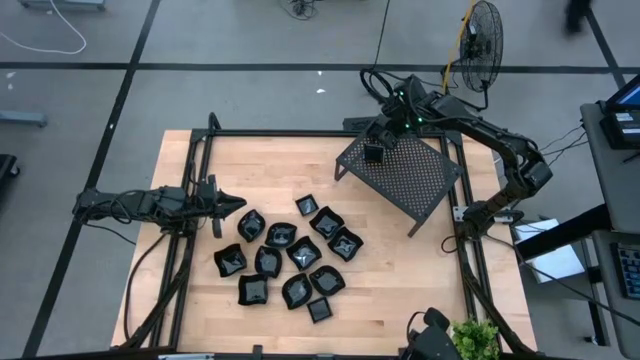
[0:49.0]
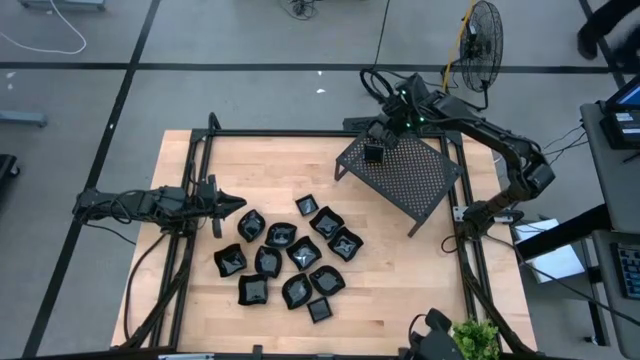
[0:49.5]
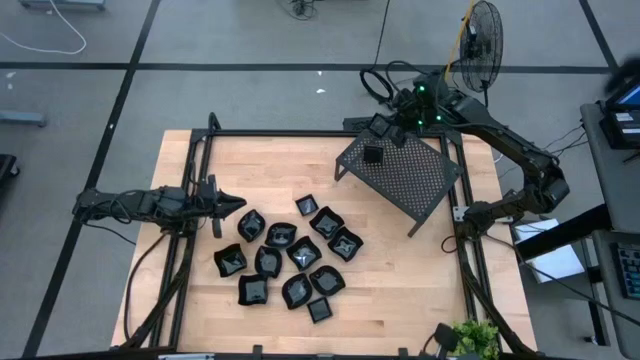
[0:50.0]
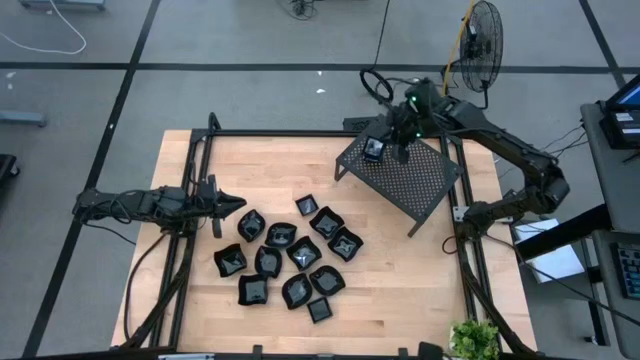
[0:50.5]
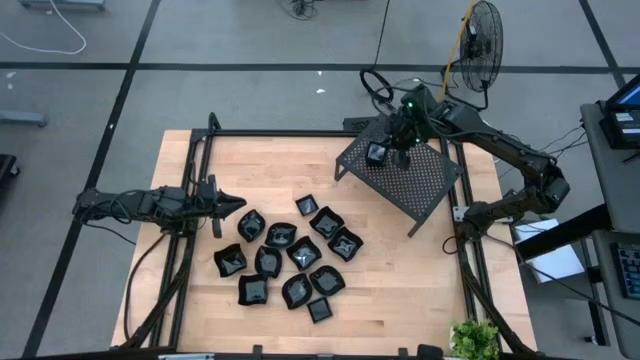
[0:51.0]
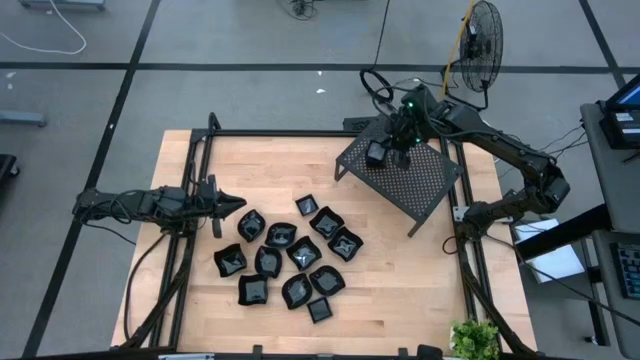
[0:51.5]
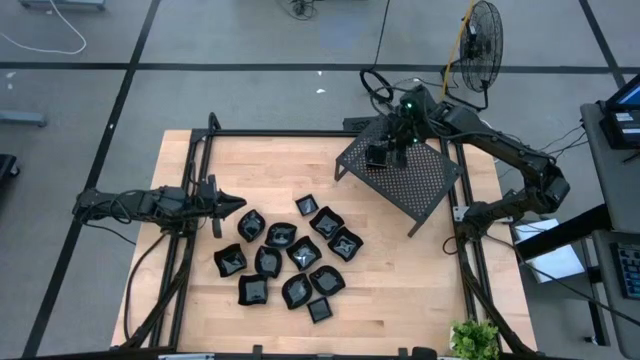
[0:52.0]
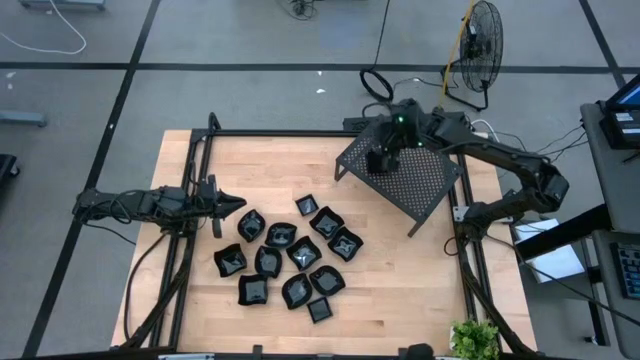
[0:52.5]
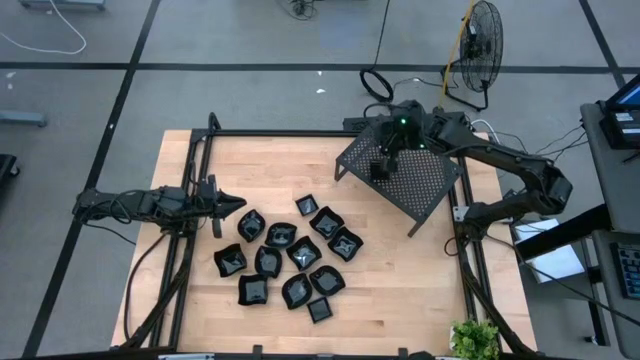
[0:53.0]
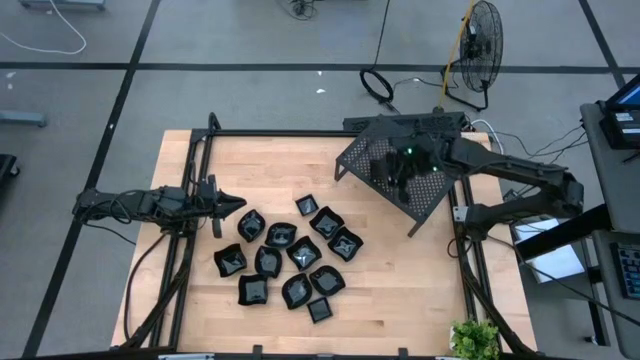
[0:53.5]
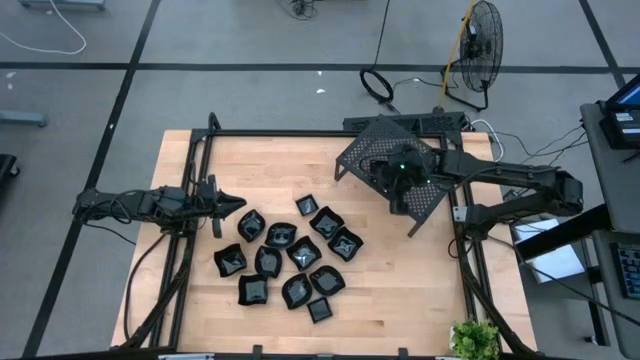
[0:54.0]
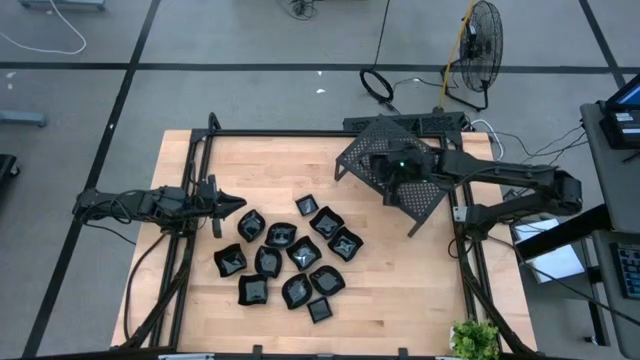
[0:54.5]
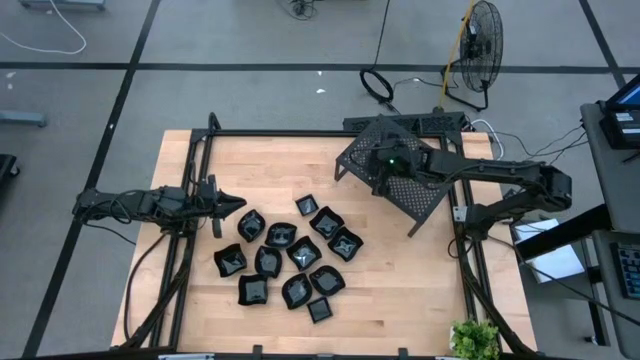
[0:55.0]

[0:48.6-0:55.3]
Task: Pick & Place Mini shaped plates
Stack the black square plate on the square black plate on the shelf

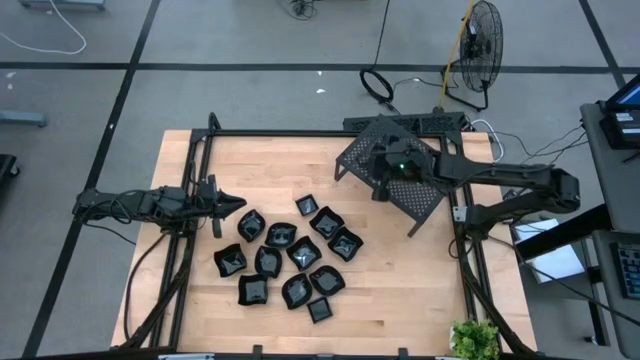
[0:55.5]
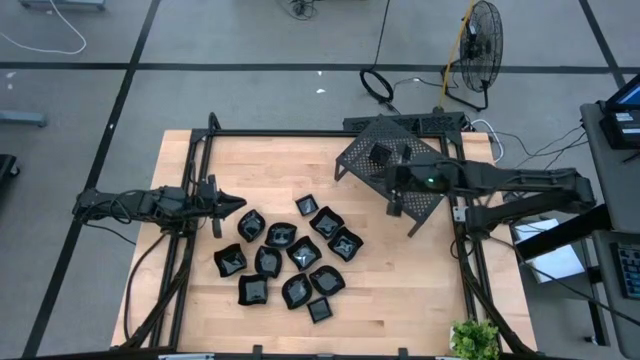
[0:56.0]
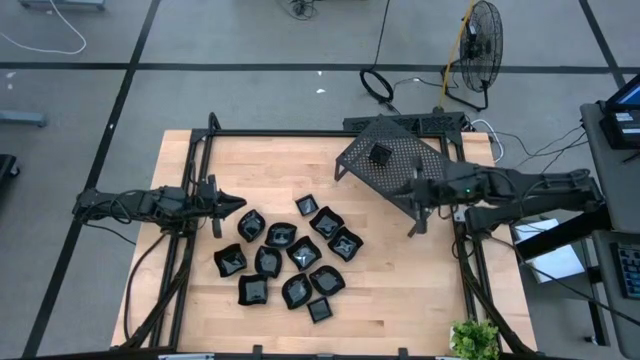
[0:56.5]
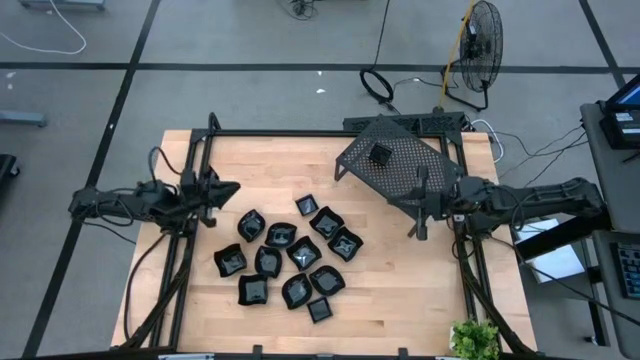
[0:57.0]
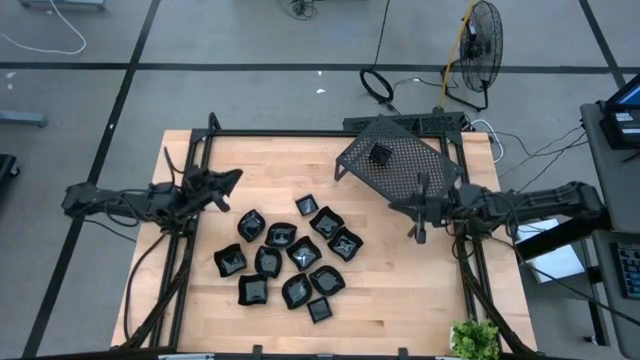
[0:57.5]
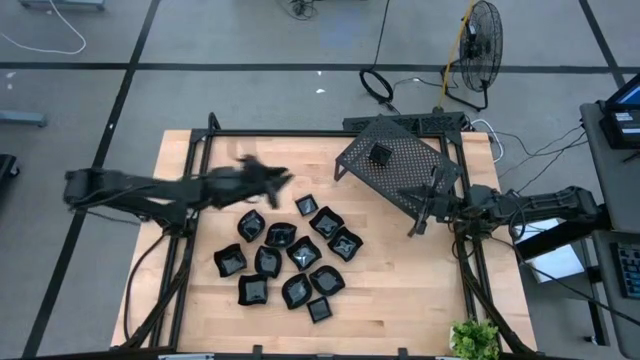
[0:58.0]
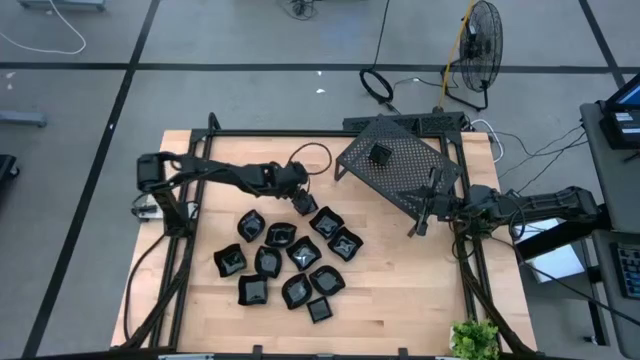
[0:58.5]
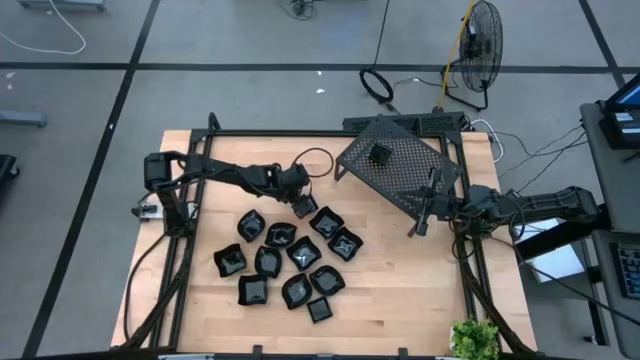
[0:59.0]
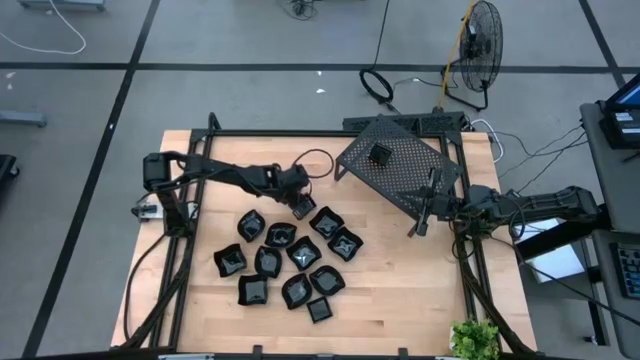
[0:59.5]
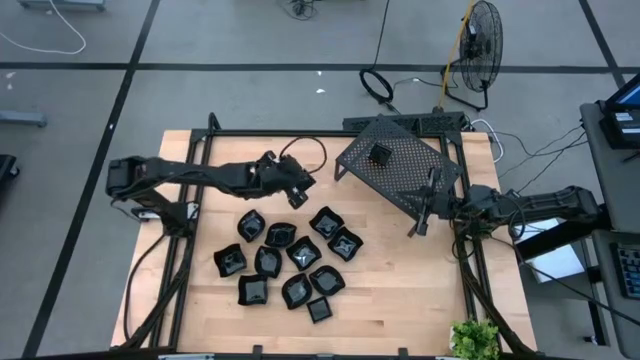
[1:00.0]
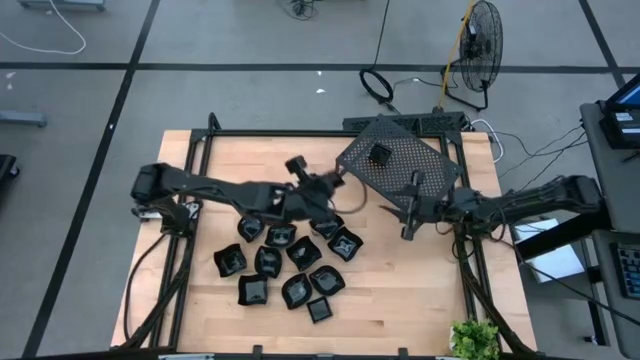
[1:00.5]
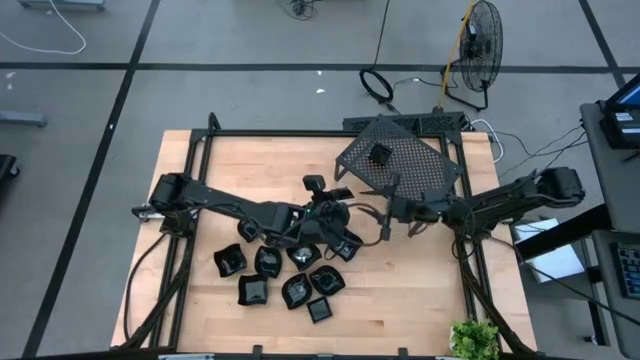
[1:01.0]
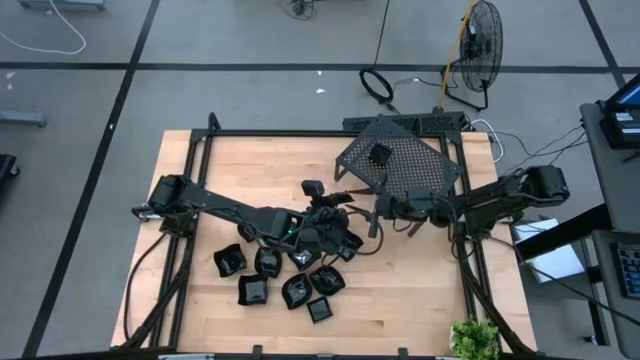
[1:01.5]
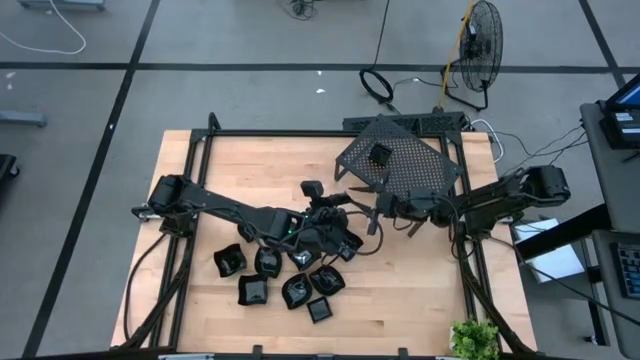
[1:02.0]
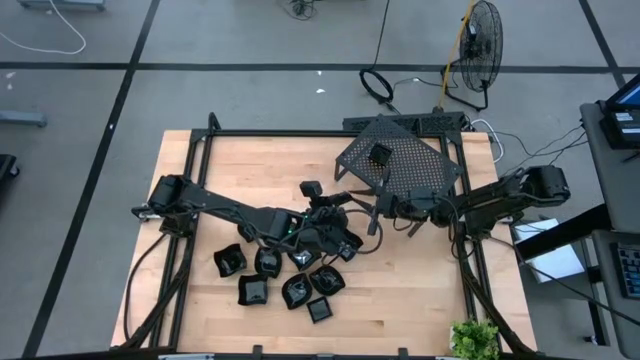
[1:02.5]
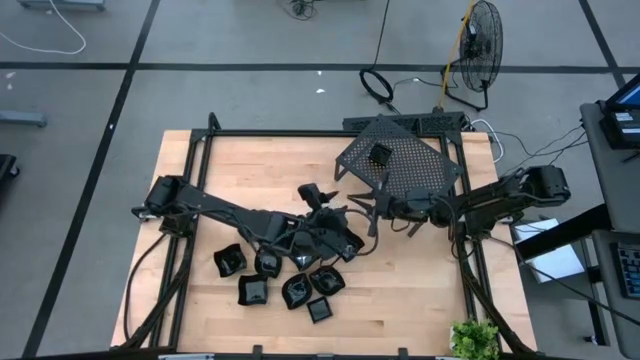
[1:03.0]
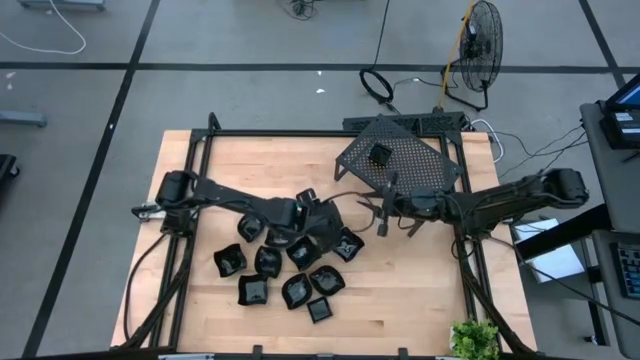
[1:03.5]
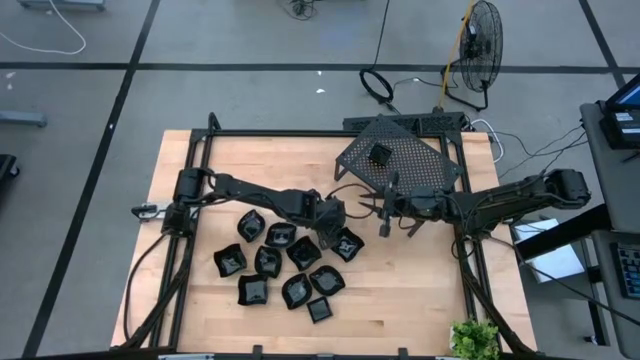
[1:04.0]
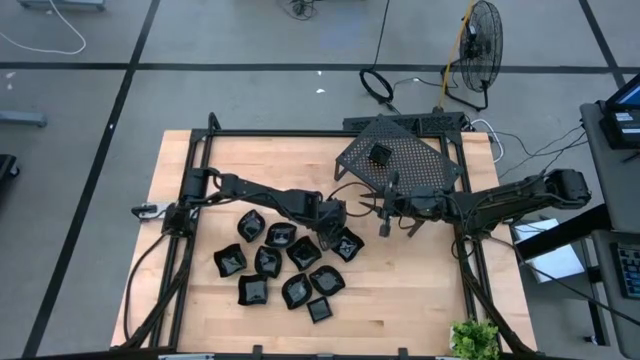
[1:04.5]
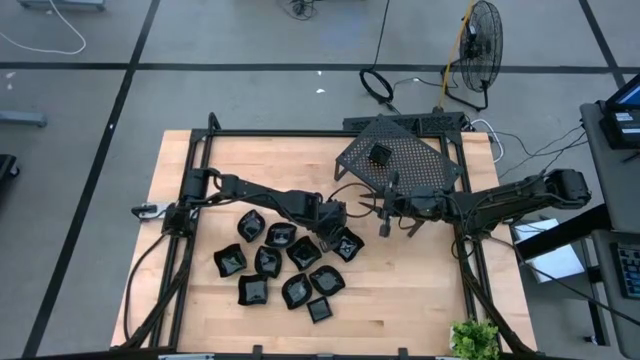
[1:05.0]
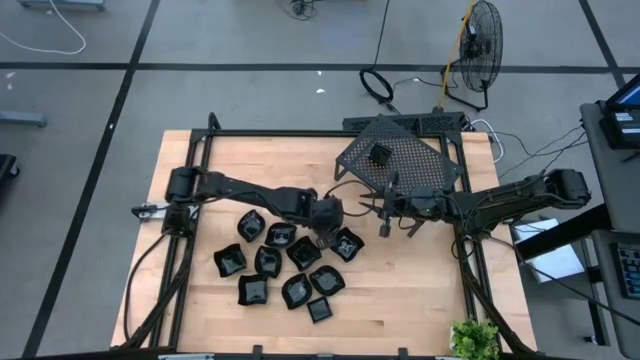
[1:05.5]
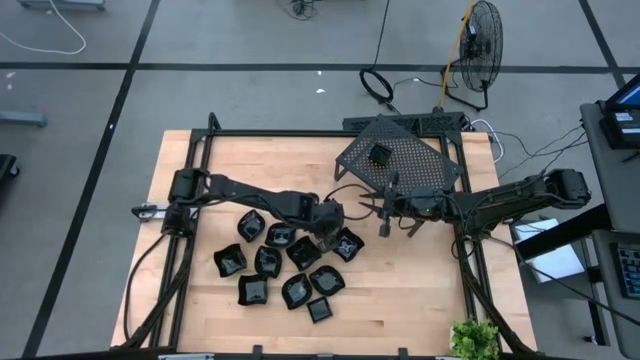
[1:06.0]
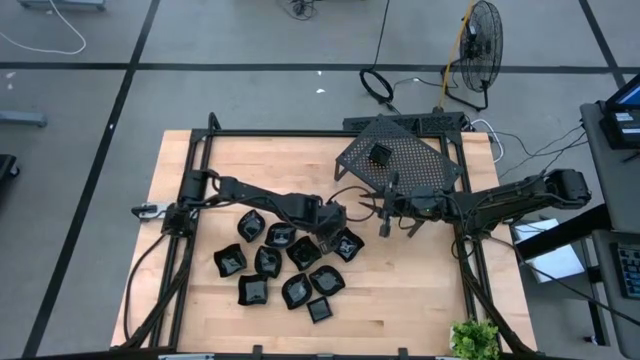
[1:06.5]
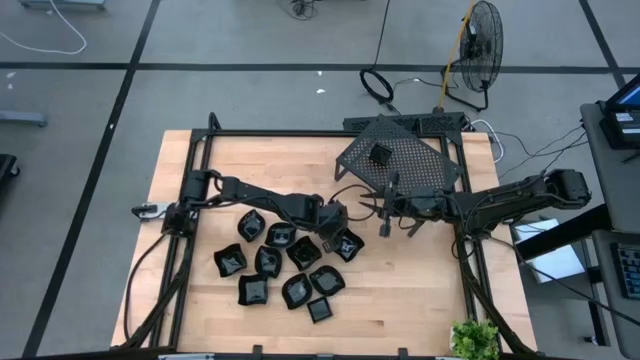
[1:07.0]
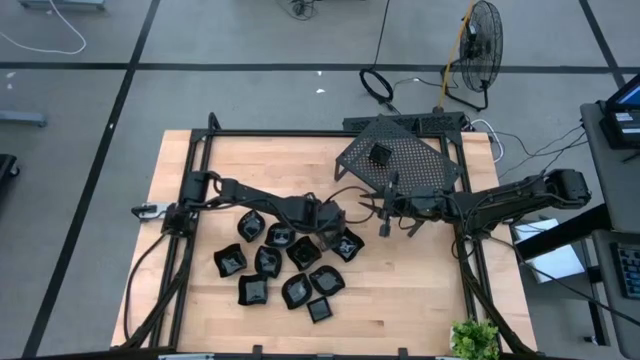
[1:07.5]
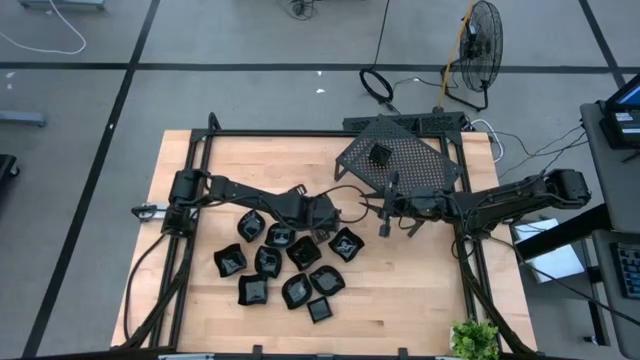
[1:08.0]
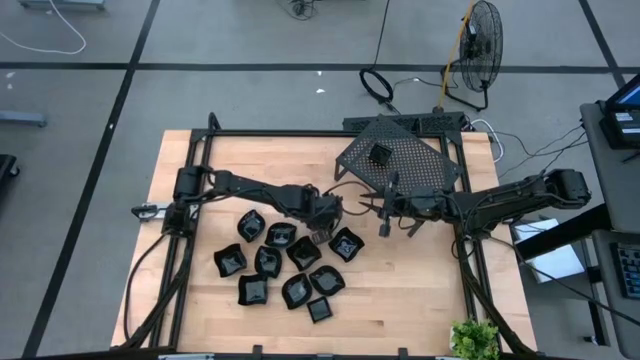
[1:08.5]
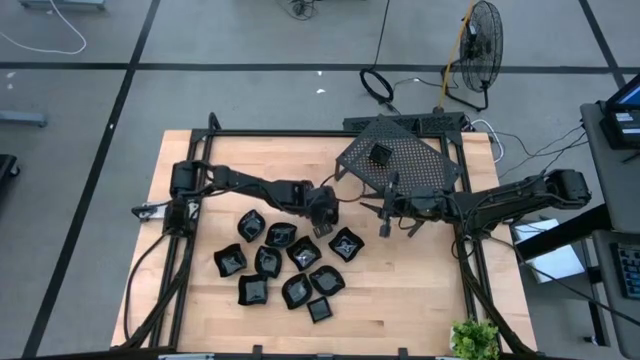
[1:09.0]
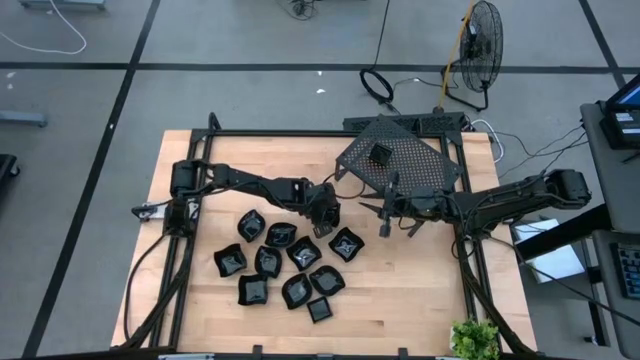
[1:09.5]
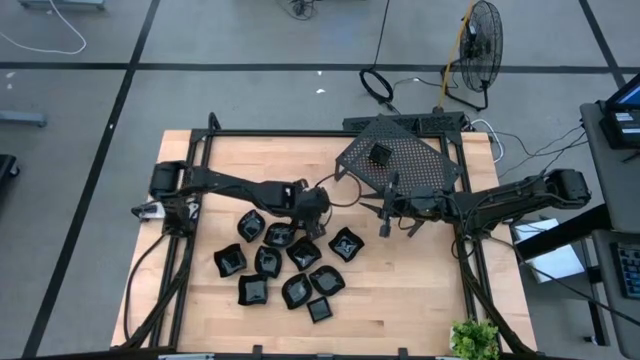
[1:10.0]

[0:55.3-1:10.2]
Stack the black square plate on the square black plate on the shelf
